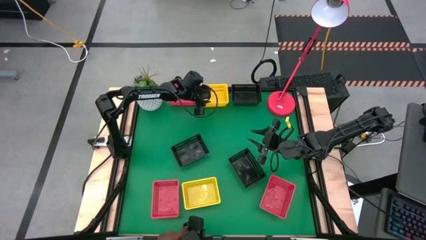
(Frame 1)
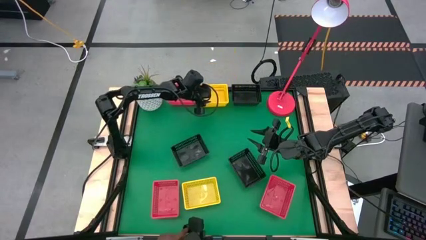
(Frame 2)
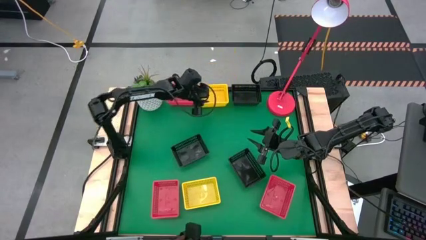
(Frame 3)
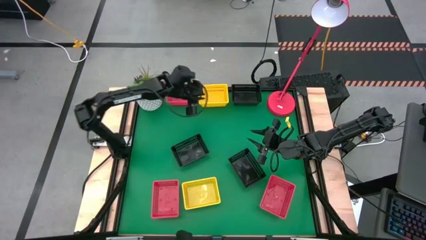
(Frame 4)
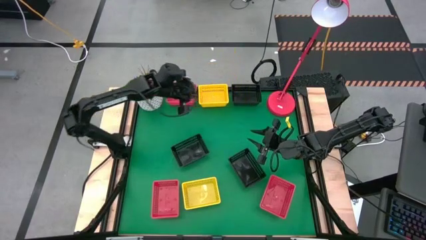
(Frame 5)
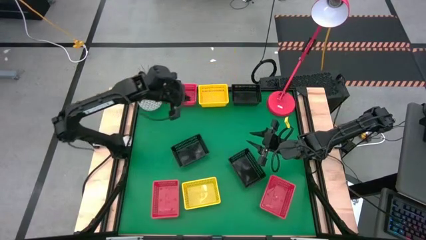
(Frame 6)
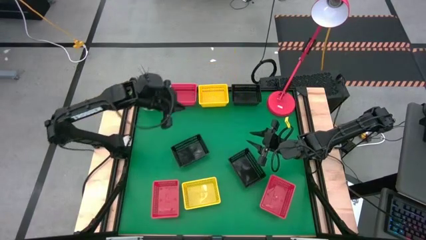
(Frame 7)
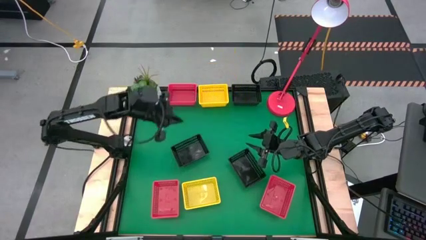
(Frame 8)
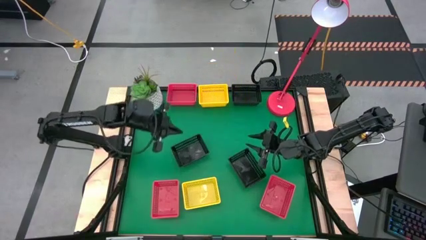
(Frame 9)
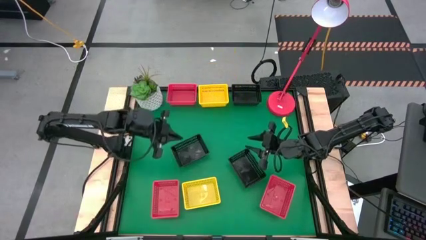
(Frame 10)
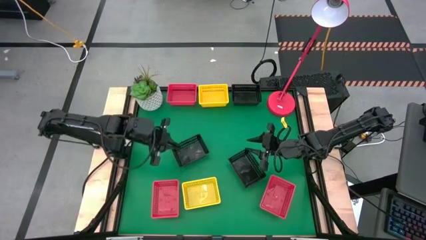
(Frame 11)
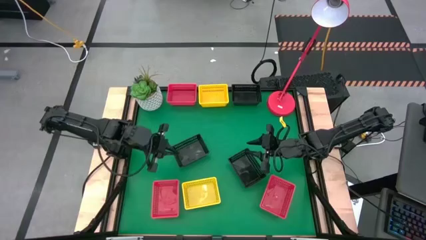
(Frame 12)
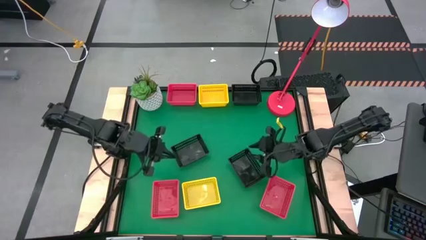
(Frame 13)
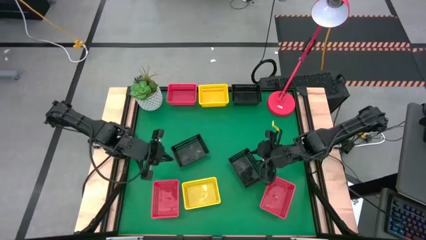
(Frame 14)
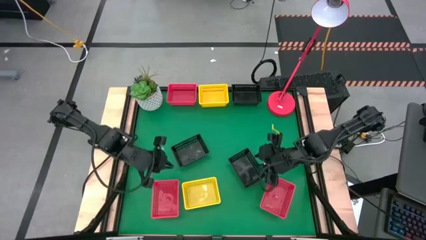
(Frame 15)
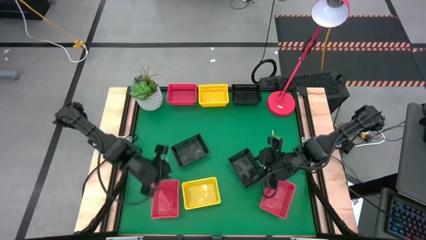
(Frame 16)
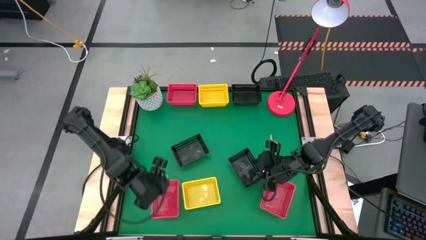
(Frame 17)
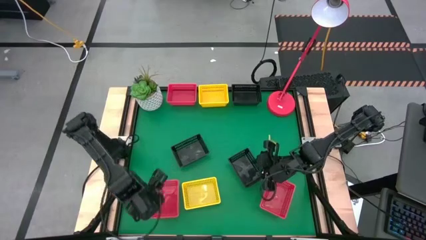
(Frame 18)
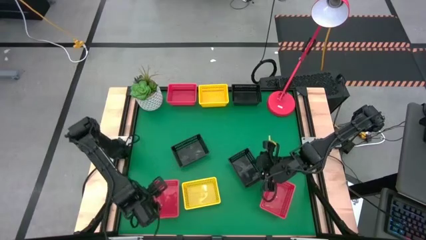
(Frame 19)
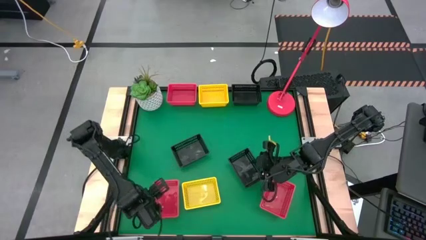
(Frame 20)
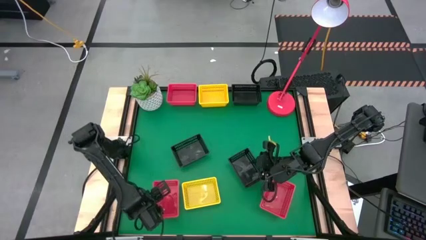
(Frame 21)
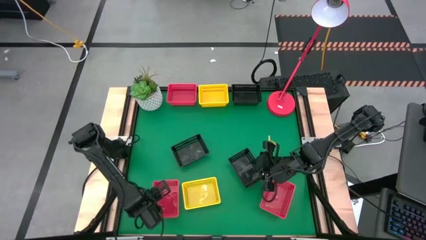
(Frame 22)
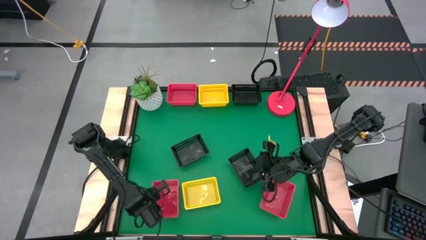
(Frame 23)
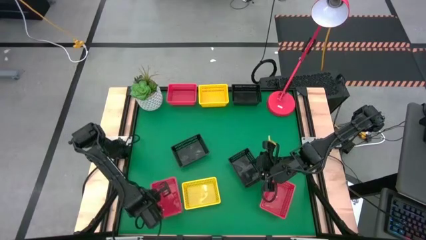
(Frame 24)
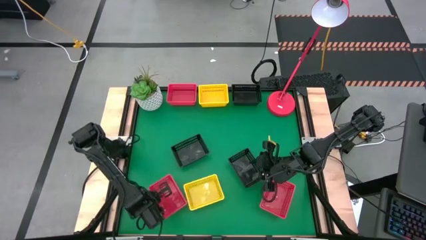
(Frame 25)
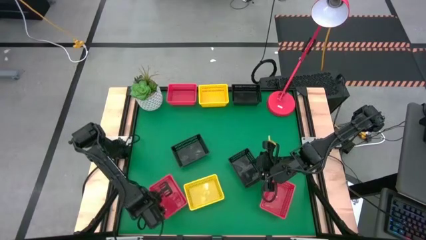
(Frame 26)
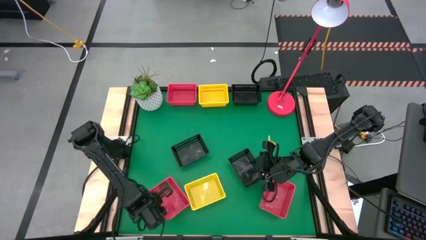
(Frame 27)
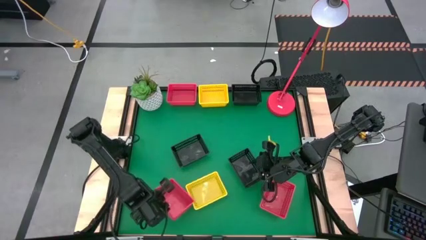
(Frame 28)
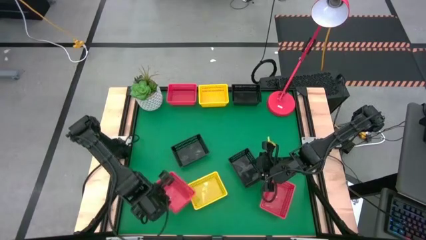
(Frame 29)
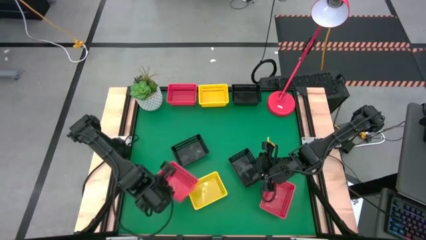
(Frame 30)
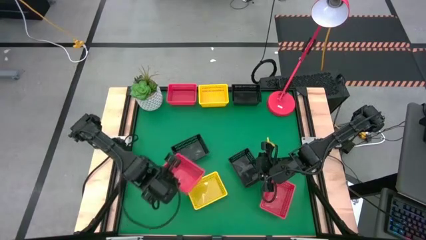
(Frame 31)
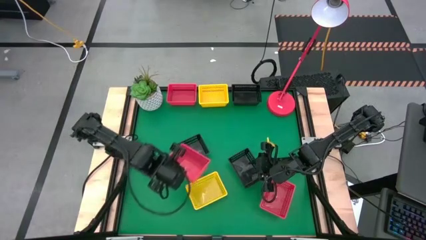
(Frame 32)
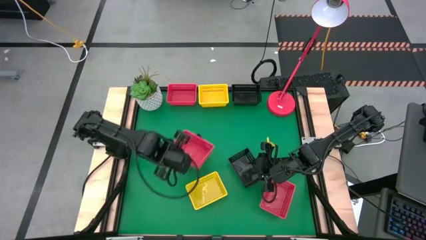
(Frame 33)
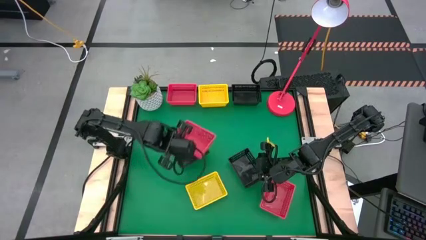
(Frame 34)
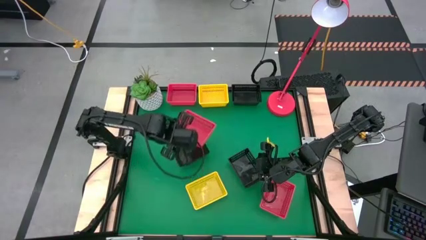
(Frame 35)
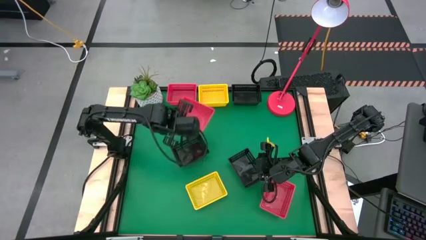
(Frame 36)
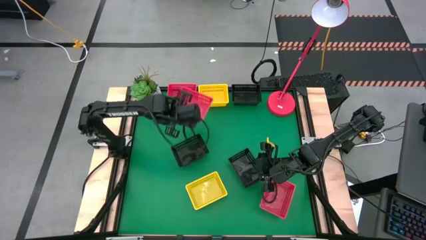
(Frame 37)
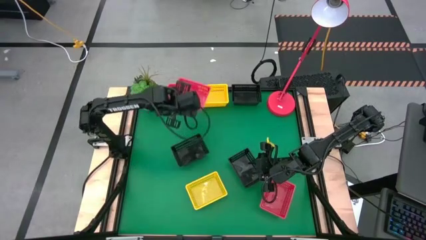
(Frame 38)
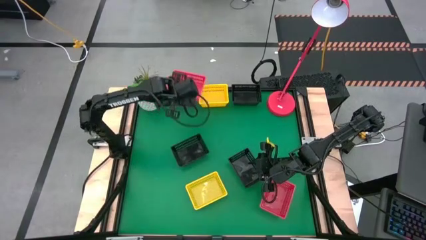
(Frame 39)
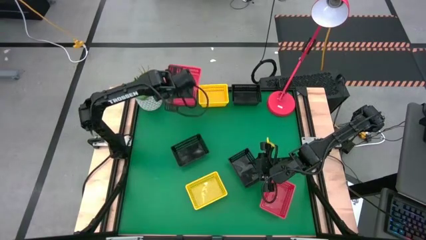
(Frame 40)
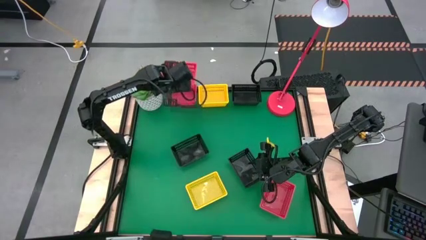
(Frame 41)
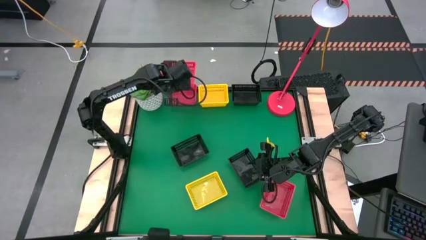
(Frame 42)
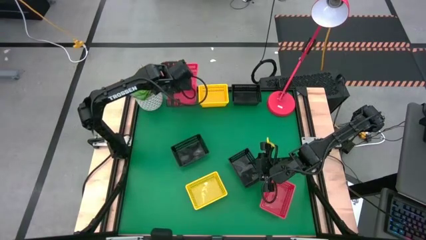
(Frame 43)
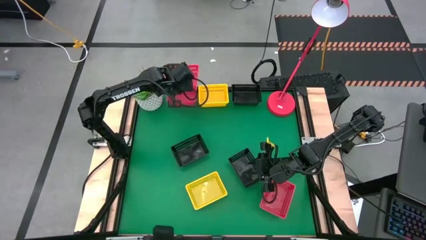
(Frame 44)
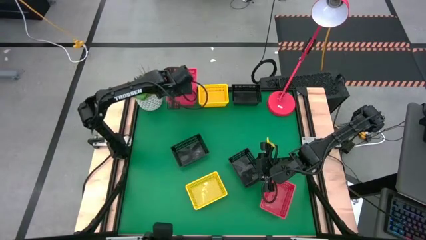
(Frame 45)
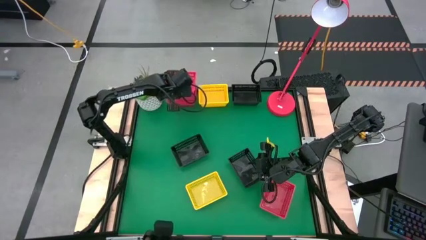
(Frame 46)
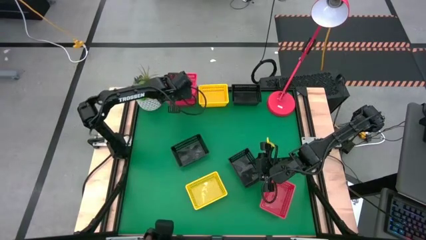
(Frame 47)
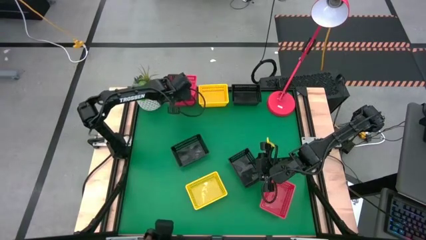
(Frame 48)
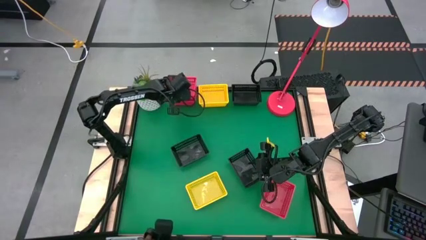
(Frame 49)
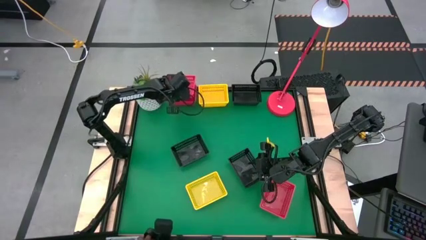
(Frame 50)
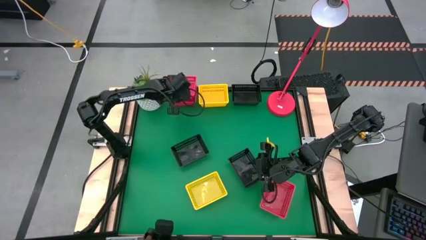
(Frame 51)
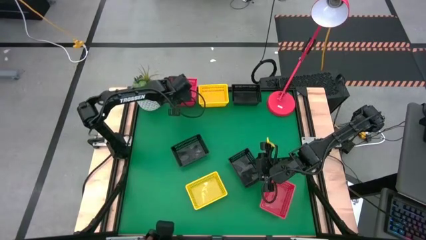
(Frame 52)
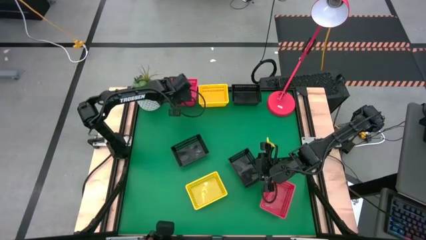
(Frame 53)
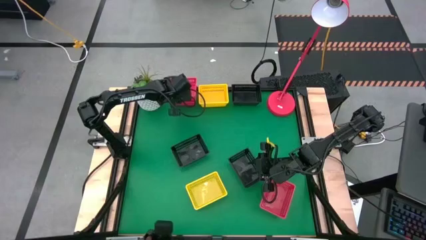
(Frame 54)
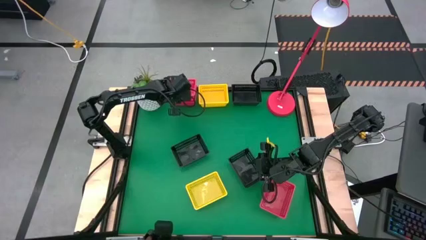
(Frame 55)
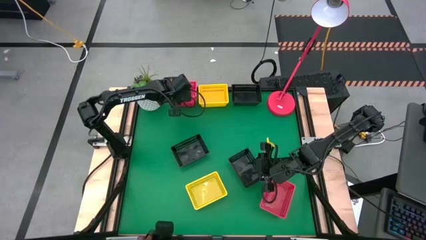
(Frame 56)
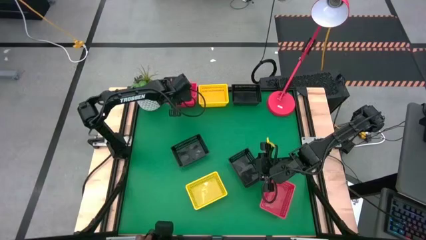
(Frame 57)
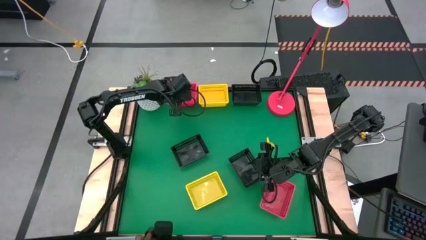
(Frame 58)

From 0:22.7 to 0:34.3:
Stack the bottom left red basket on the top red basket
